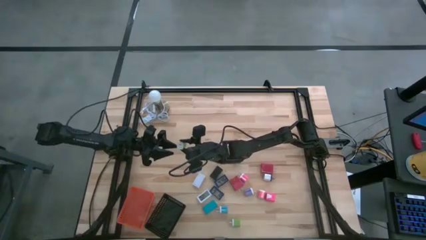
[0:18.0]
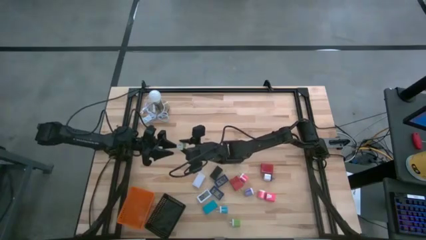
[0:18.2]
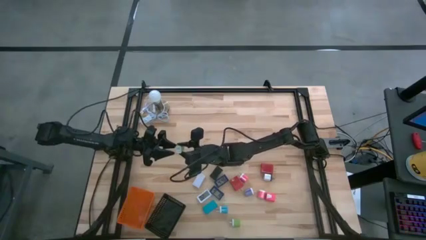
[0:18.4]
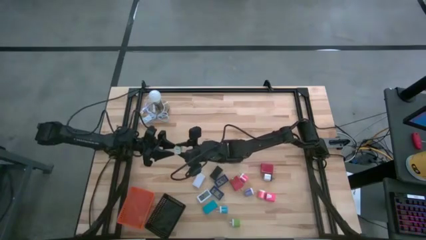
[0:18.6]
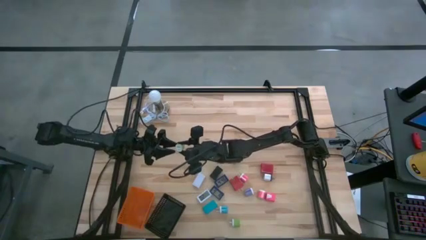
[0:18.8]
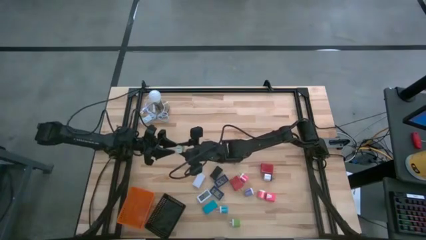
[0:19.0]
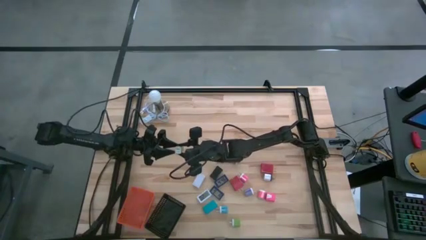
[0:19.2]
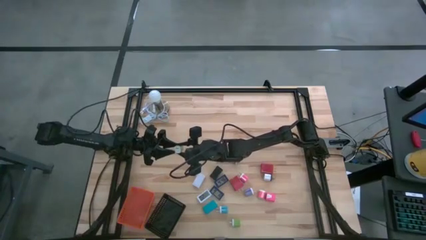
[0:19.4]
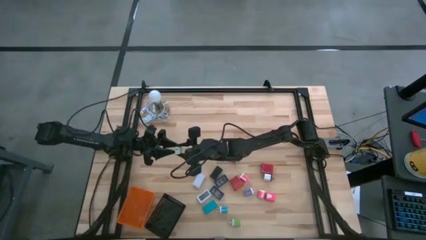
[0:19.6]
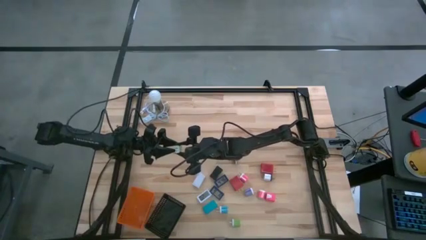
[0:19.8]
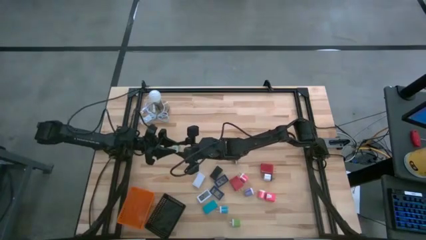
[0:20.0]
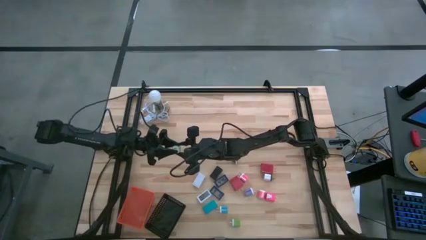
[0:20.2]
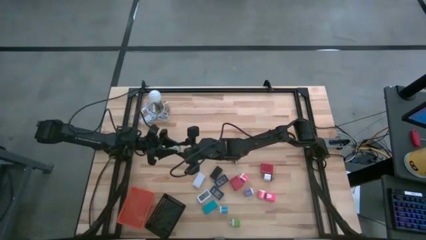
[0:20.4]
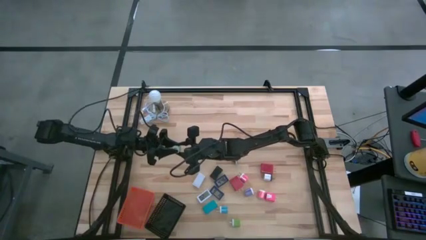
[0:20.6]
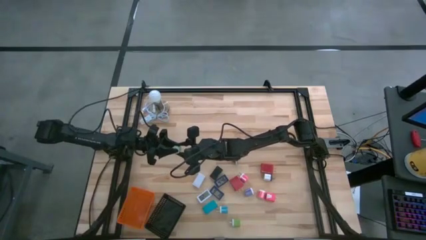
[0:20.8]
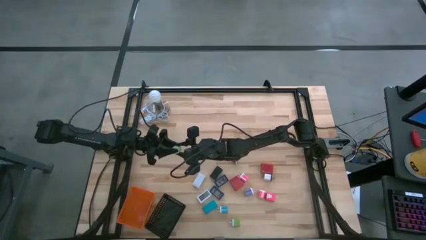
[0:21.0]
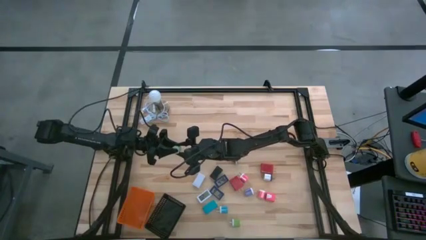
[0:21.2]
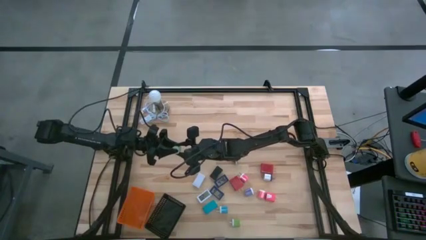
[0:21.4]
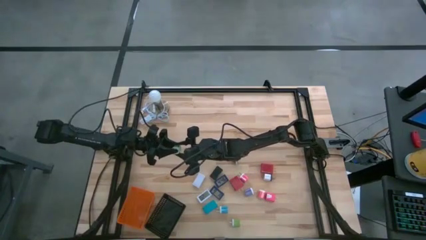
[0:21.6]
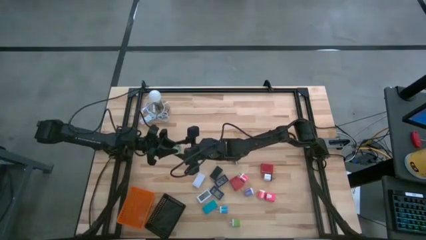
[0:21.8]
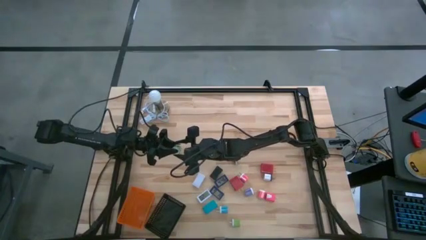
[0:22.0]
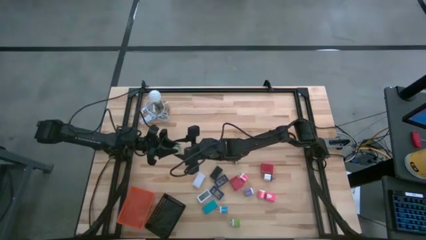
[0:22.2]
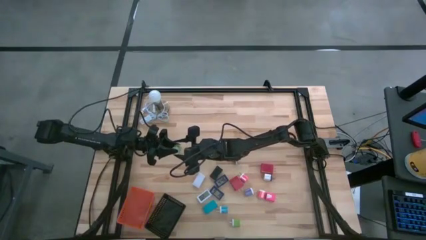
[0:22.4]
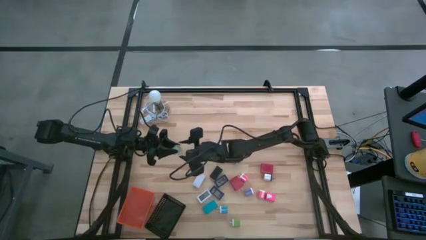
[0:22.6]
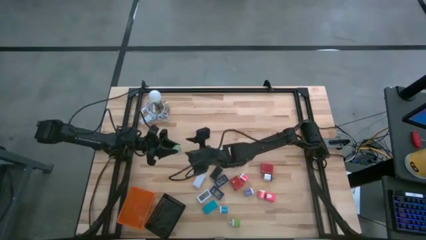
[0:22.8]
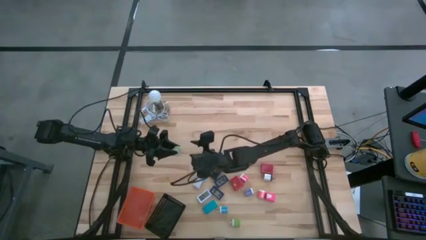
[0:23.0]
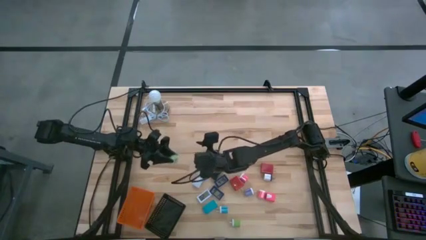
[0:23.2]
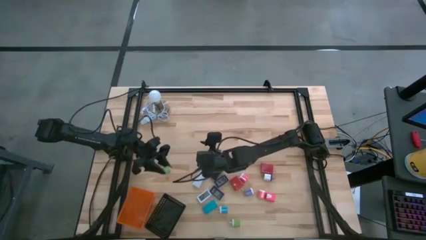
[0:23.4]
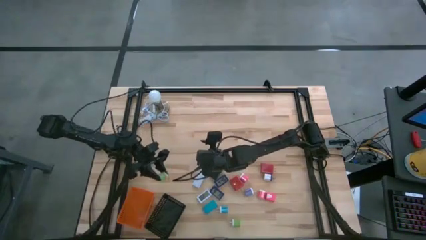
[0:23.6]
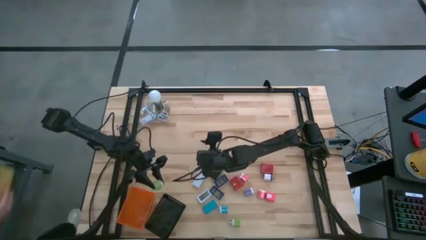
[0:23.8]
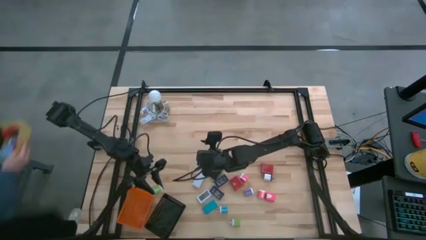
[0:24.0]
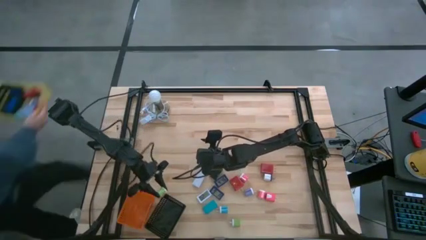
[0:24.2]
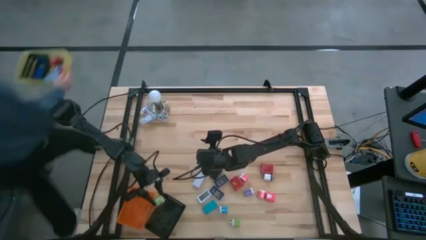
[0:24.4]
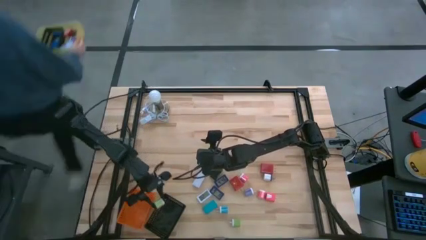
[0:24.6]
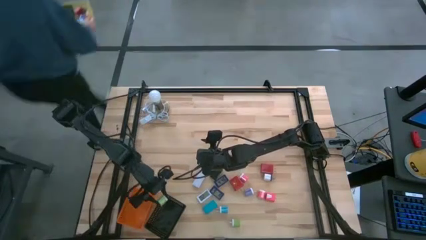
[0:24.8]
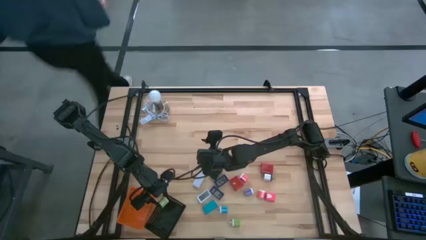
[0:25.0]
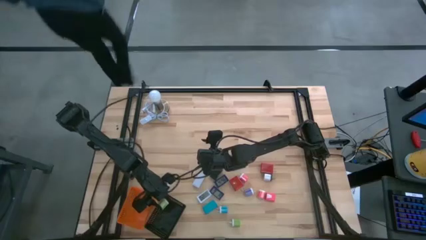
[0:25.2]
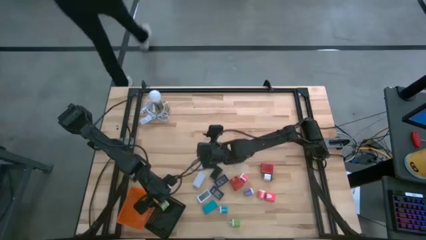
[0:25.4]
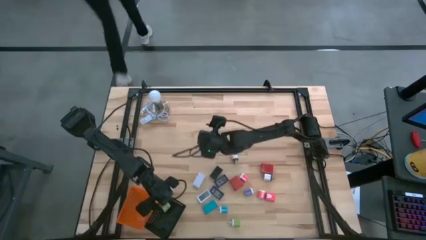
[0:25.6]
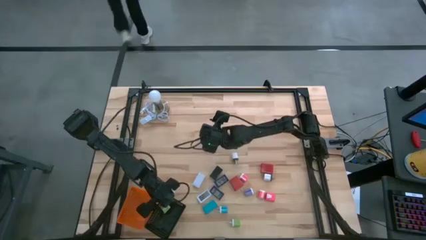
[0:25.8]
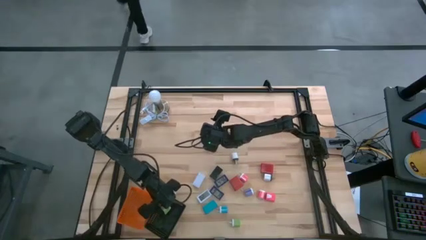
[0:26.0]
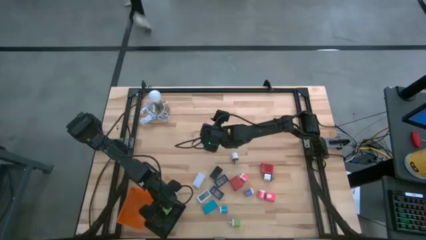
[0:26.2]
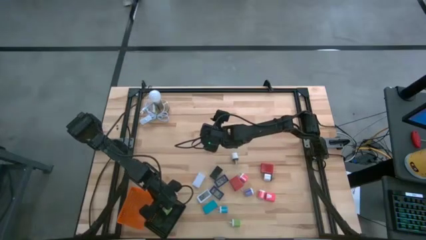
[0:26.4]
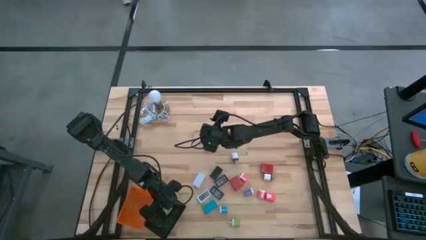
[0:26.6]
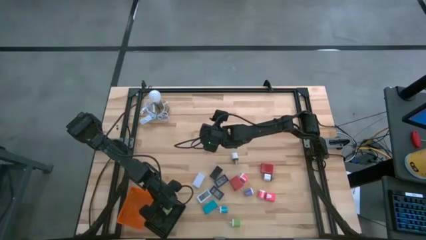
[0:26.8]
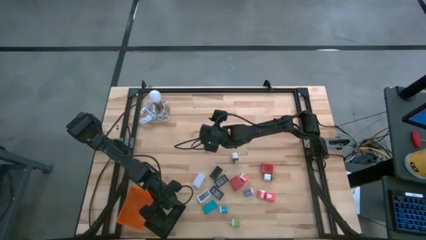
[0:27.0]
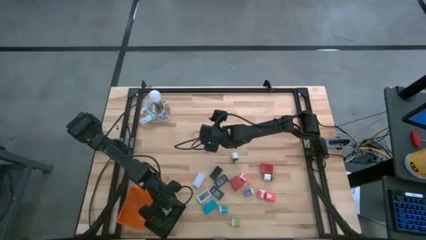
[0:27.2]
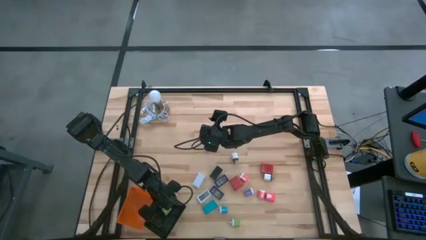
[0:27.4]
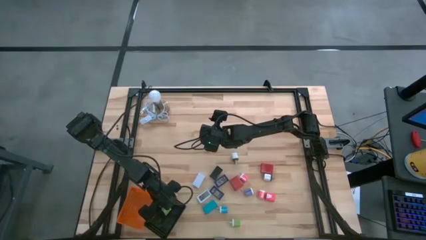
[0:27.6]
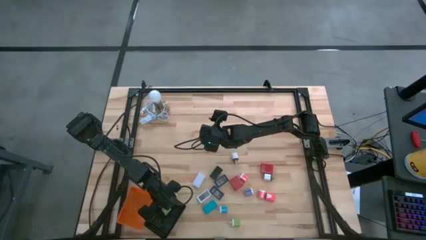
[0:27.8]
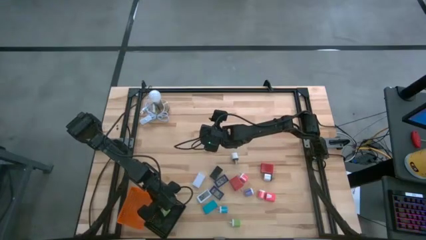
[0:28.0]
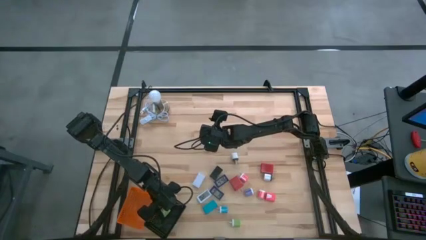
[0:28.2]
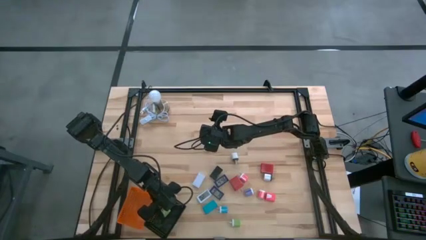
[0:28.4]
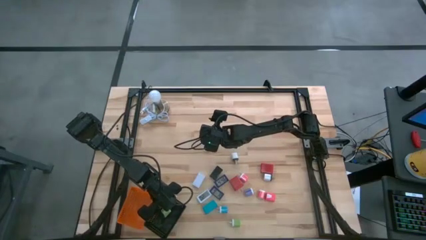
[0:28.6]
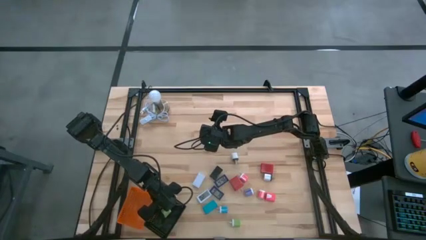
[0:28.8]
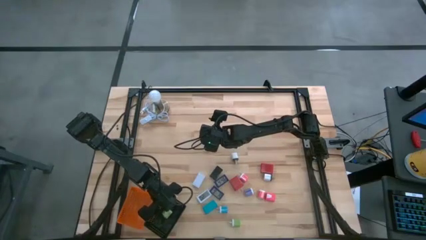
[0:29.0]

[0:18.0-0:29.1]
Task: Pick & Place Office items
Put the top green charger adapter into the black basket
